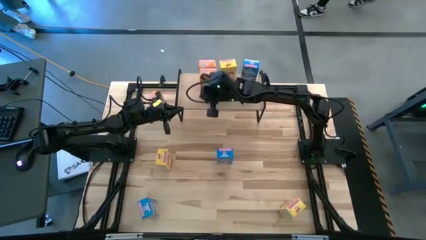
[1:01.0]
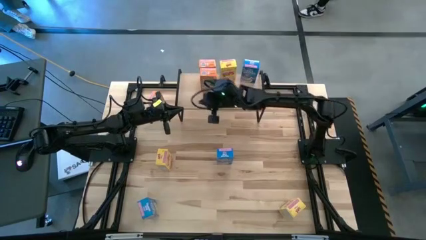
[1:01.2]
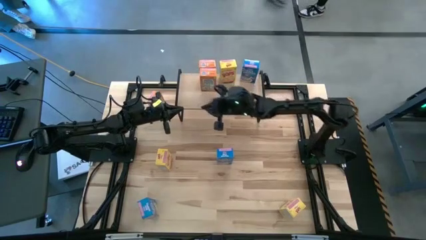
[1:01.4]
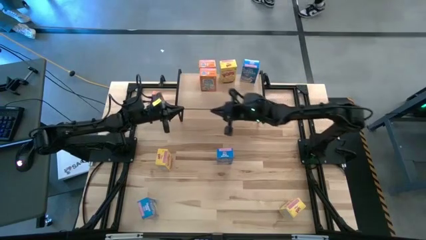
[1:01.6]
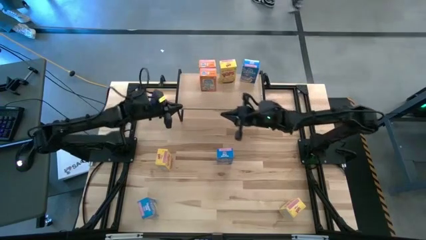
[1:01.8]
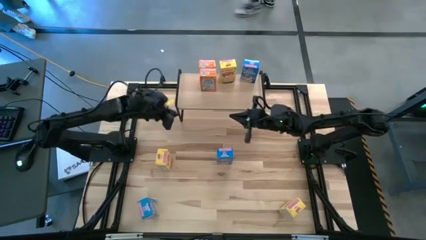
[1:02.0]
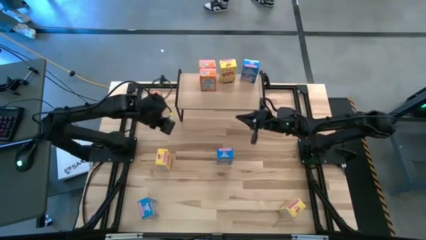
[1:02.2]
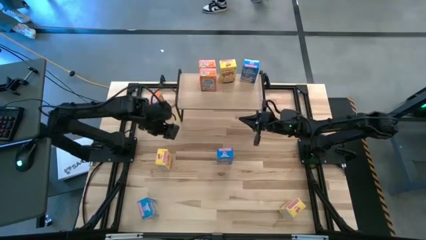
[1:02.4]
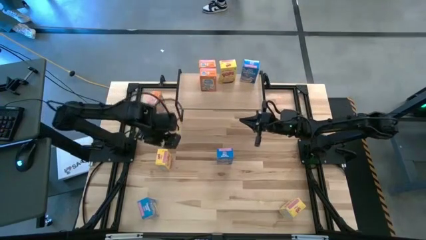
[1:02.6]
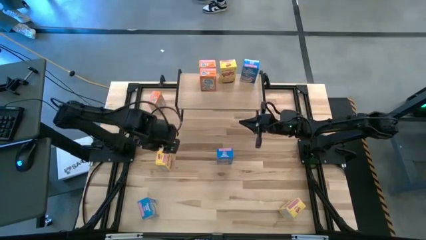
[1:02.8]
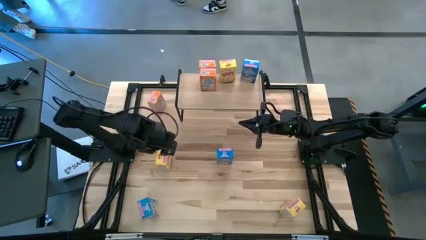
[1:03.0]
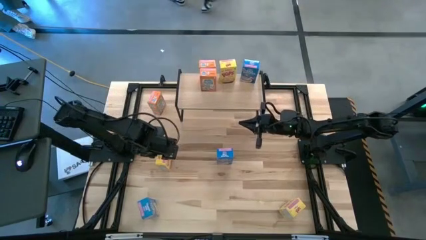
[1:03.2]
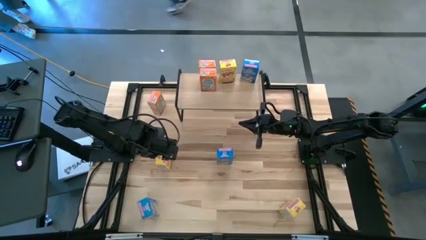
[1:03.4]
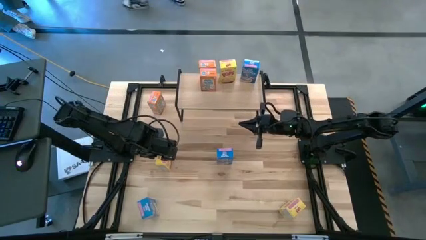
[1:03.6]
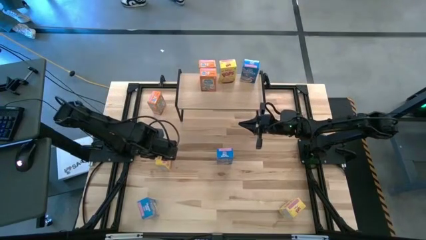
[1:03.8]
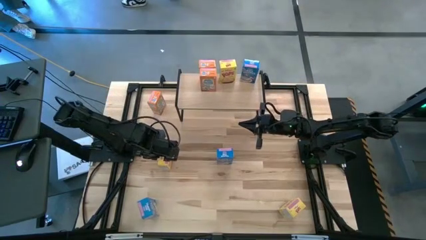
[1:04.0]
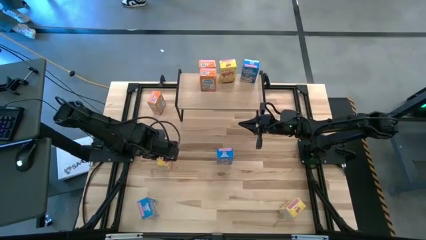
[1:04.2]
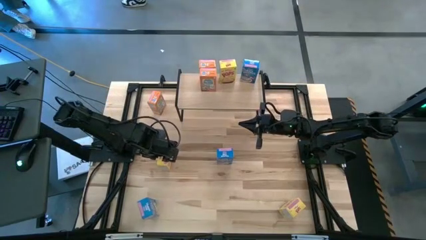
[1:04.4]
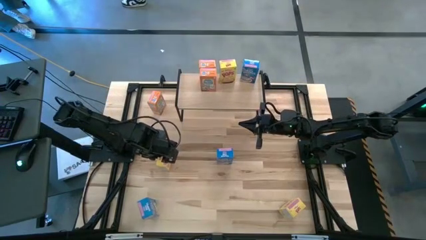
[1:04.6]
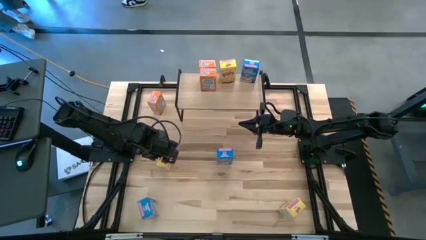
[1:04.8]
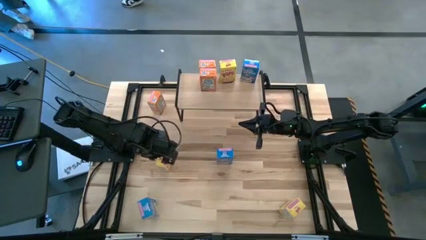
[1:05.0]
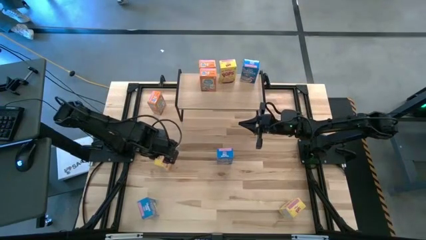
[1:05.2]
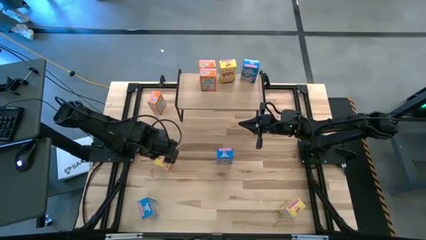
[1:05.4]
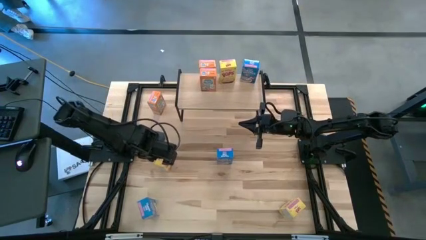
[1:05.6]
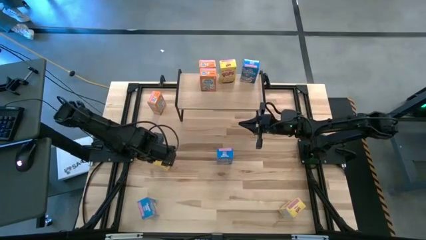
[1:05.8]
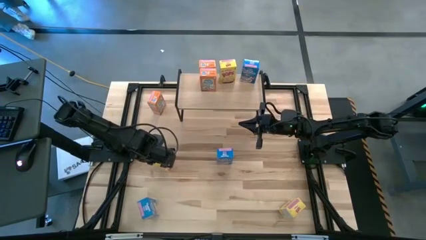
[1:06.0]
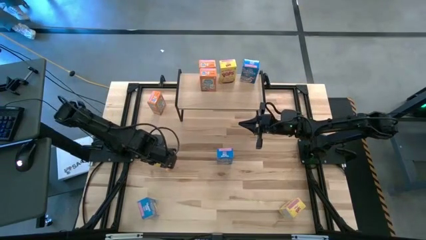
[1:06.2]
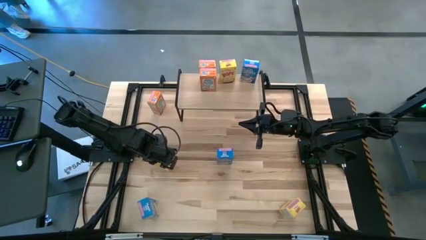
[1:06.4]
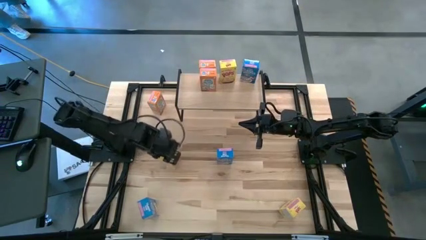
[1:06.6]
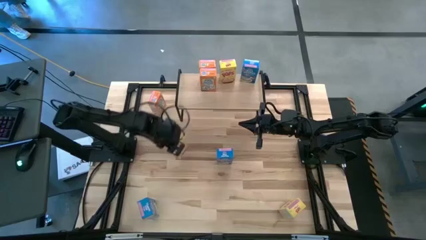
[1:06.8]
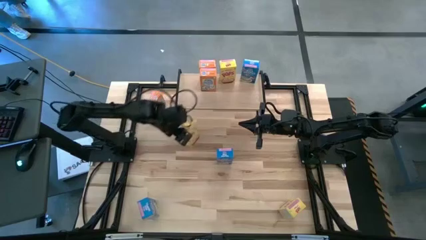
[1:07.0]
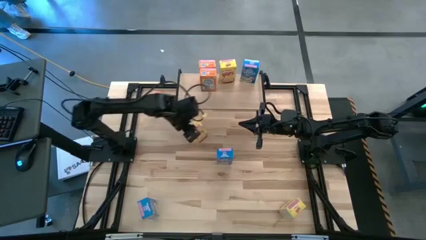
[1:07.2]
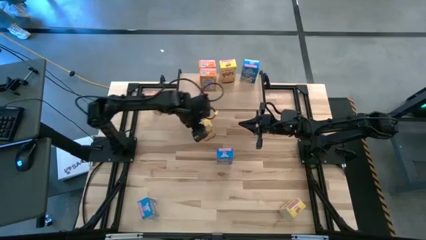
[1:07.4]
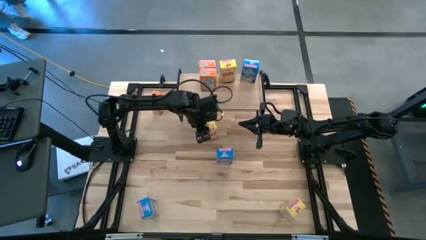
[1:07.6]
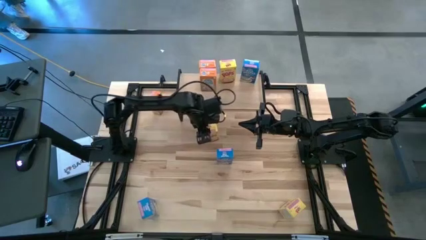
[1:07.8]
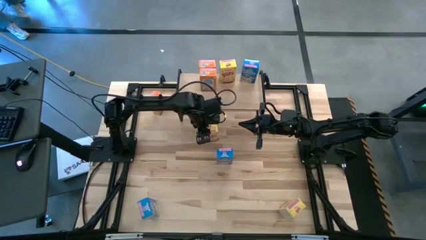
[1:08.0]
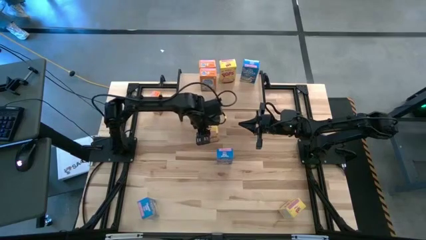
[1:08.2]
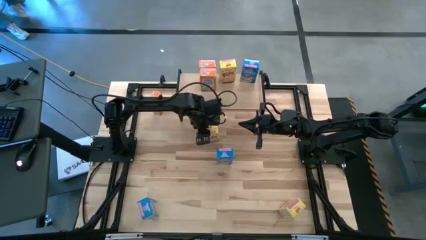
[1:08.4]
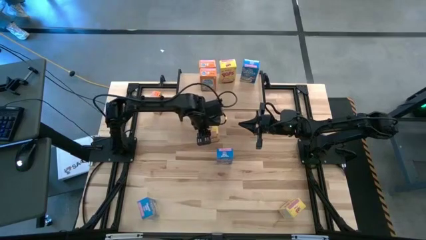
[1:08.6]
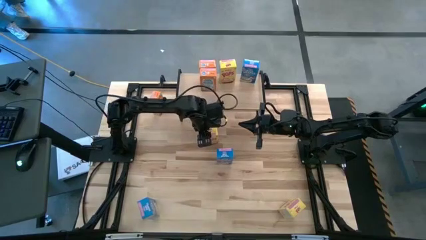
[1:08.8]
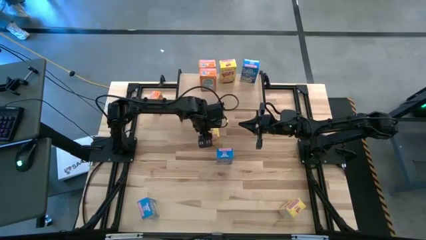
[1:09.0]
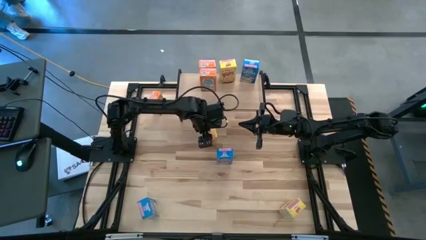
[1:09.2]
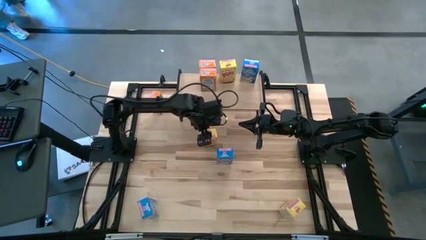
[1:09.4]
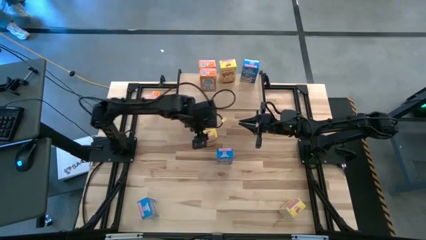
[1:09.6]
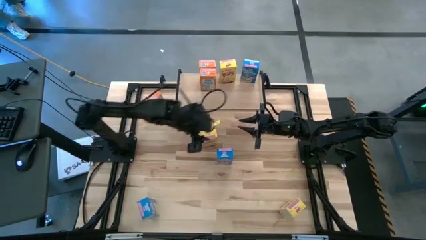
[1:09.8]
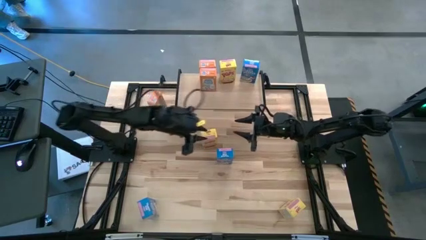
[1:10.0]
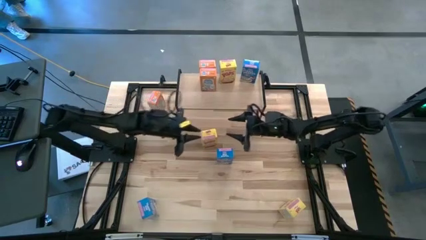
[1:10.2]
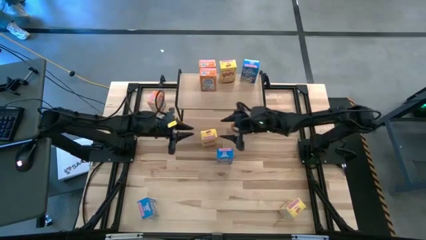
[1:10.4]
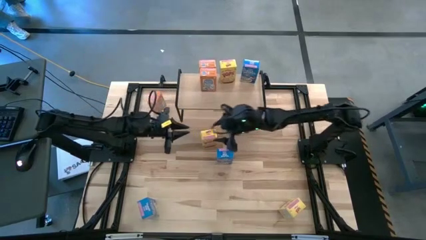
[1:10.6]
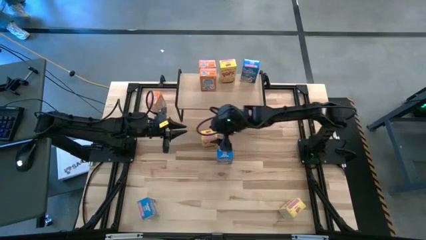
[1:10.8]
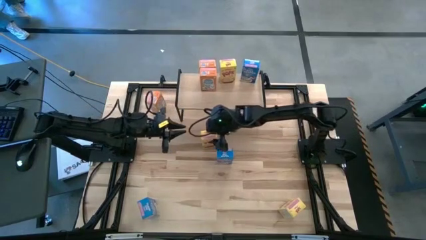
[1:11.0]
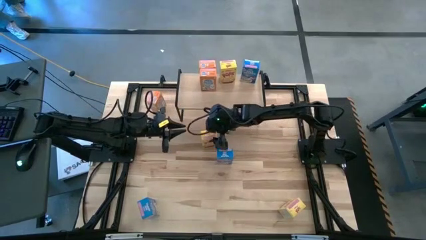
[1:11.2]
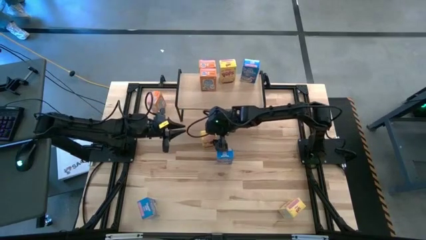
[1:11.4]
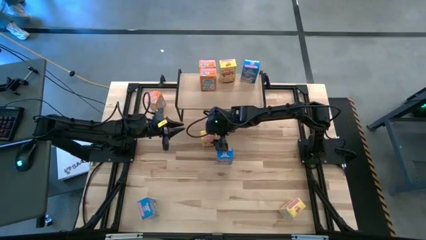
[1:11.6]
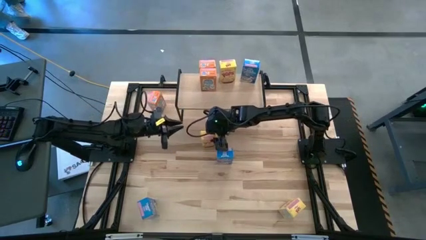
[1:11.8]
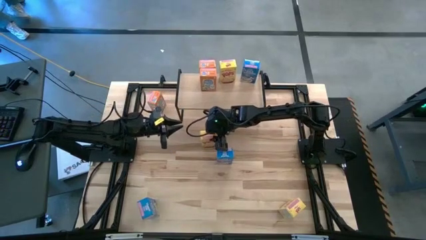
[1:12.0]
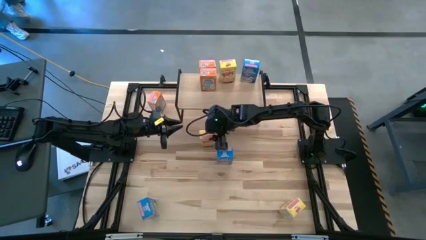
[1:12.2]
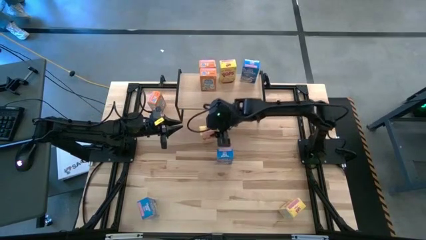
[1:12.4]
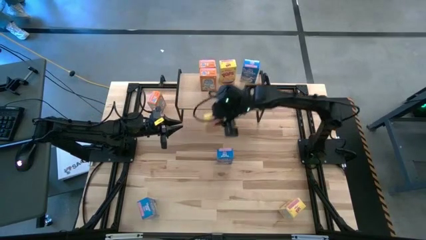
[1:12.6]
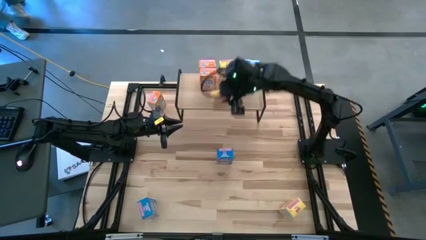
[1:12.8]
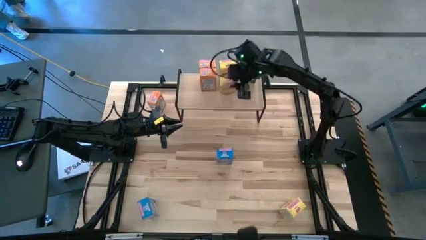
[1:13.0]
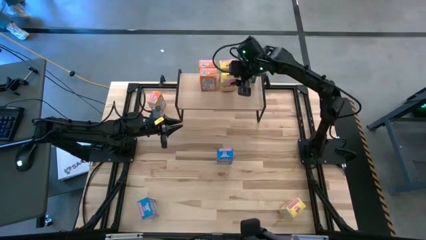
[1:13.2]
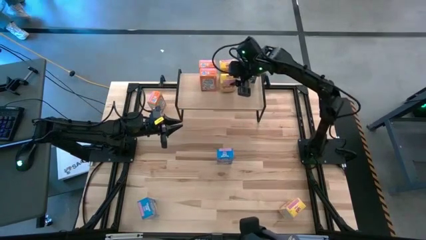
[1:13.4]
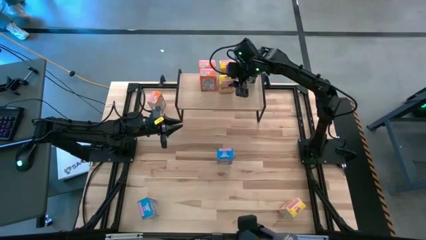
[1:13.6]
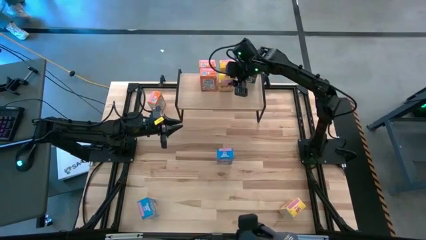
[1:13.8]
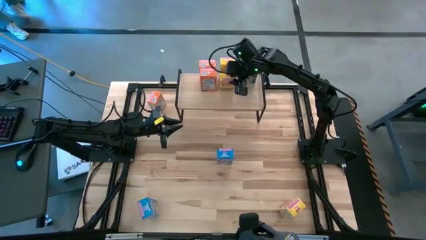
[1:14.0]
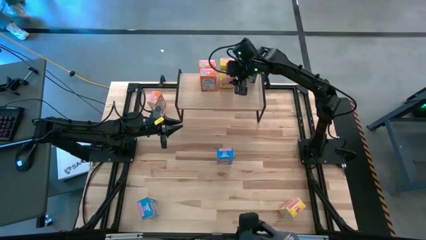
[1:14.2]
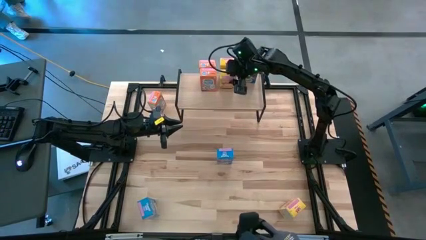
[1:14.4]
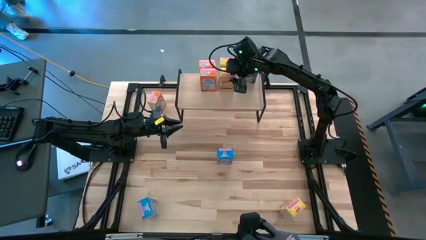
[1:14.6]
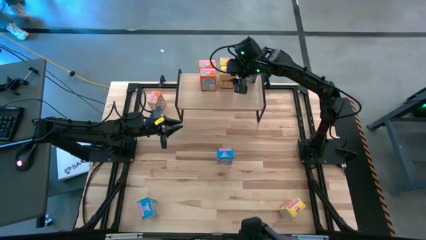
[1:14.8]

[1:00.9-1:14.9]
Task: Stack cereal on shelf
Put the left yellow cereal box on the shelf aligned with the other yellow cereal box

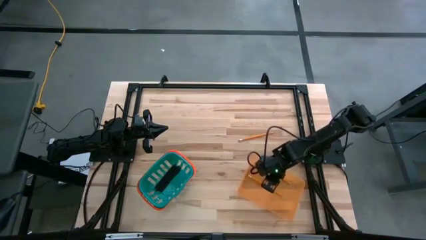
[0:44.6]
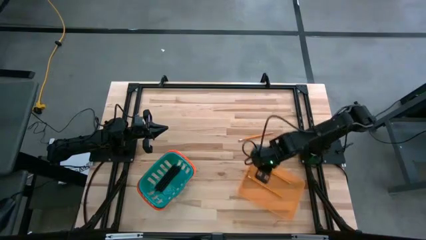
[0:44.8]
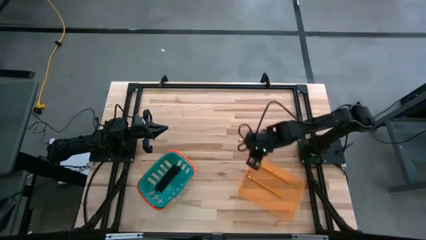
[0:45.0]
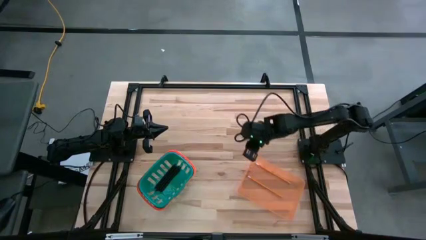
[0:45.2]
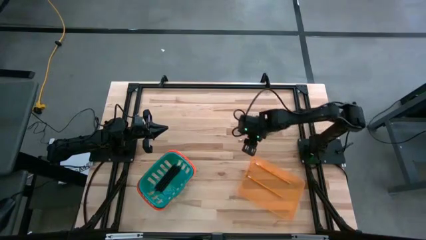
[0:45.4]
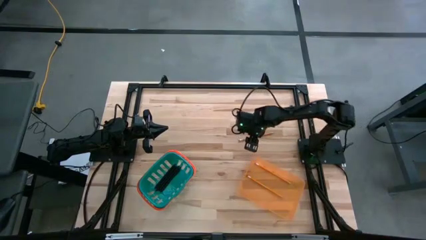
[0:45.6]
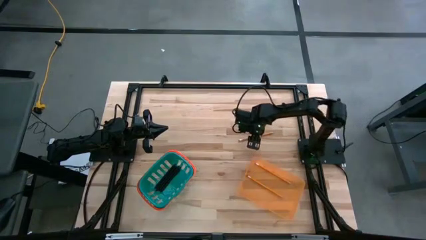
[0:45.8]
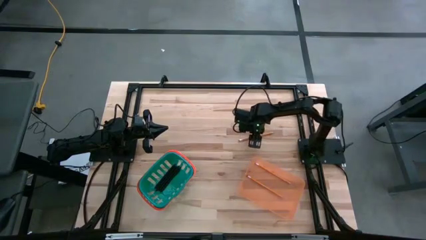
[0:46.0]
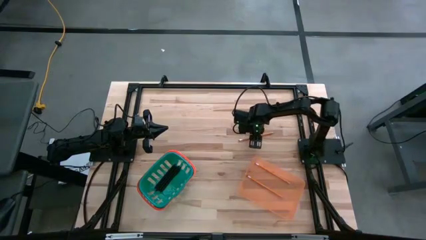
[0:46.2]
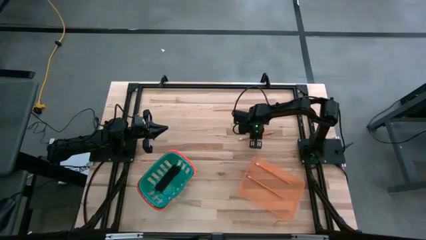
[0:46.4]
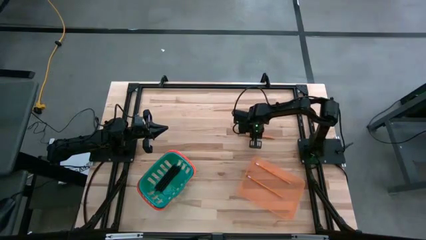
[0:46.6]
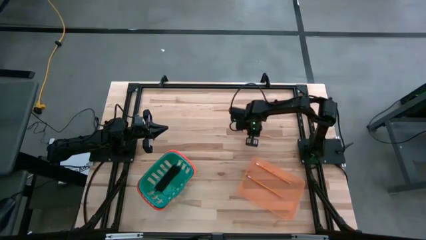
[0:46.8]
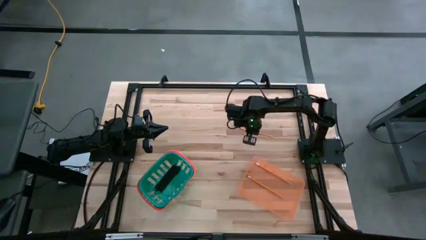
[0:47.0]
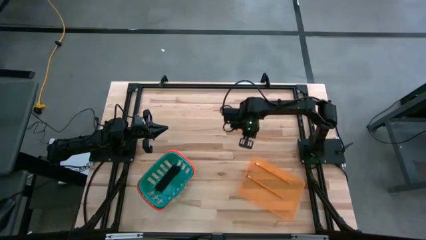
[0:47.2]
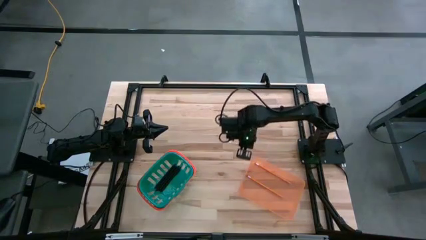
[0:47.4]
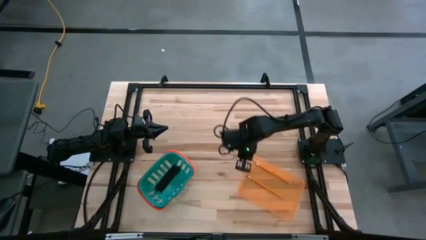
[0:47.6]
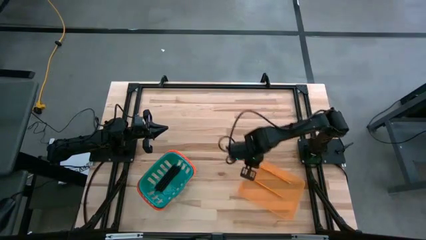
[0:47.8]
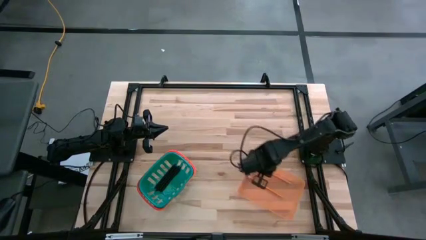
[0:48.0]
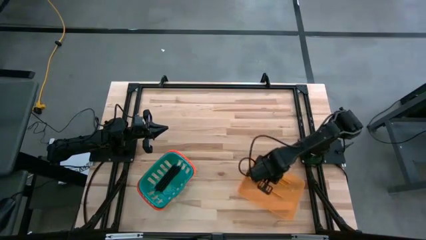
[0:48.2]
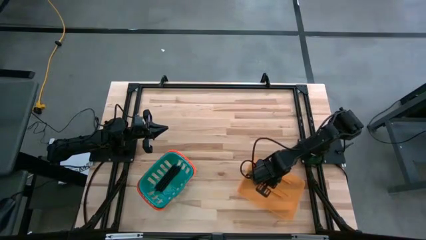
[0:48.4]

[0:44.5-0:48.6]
Task: Sort pens & pencils
Put the orange pencil into the orange bin
